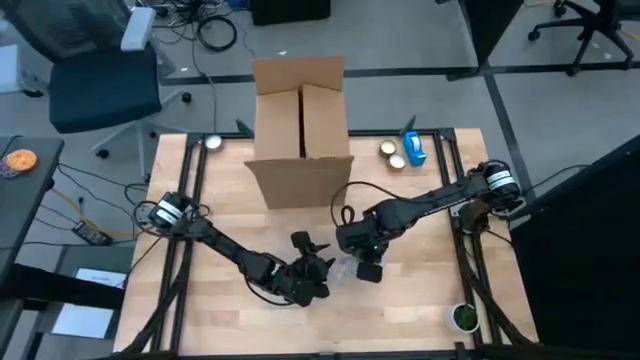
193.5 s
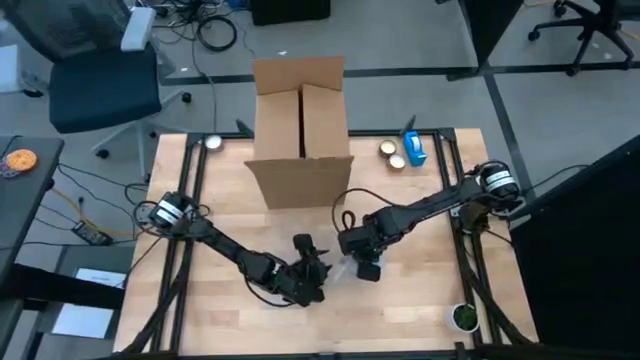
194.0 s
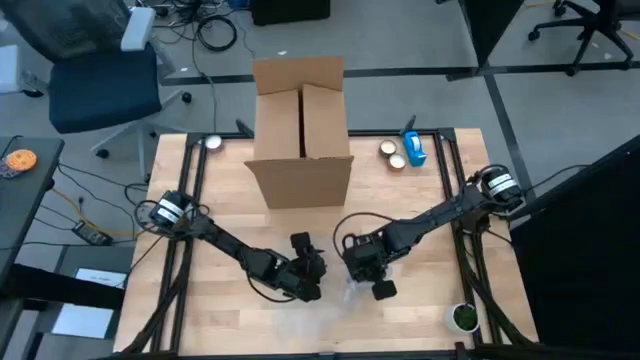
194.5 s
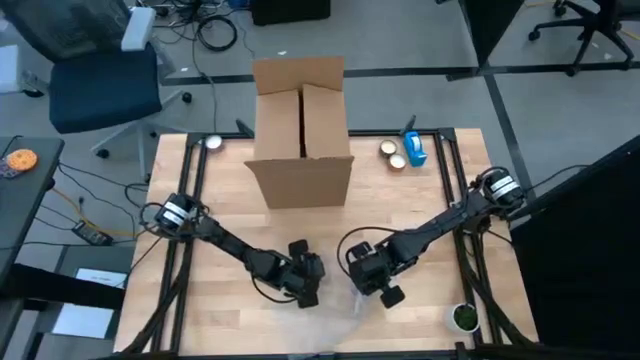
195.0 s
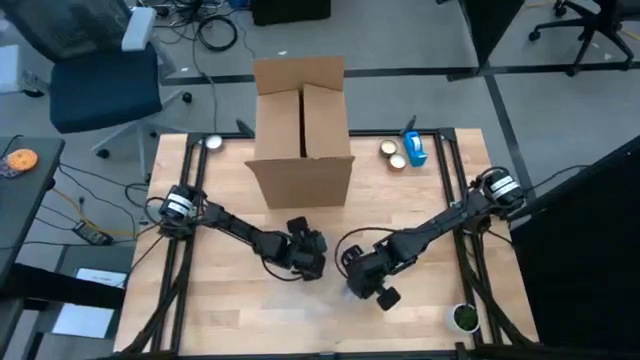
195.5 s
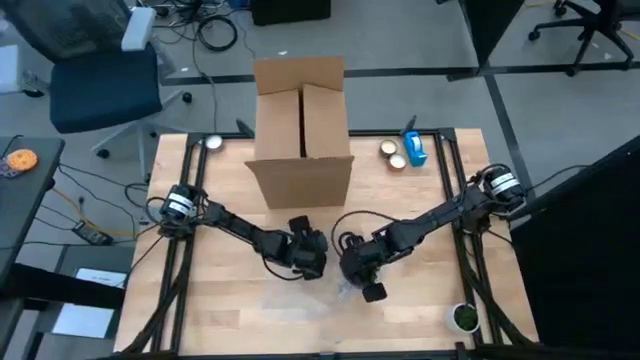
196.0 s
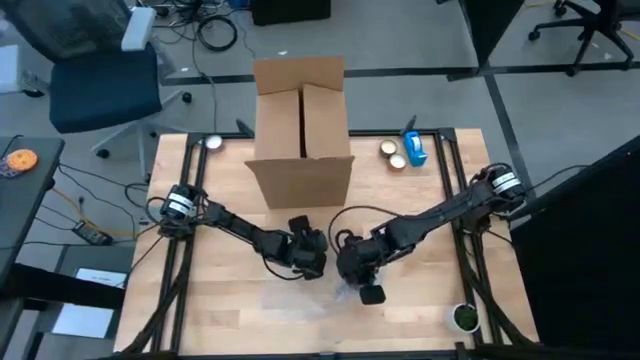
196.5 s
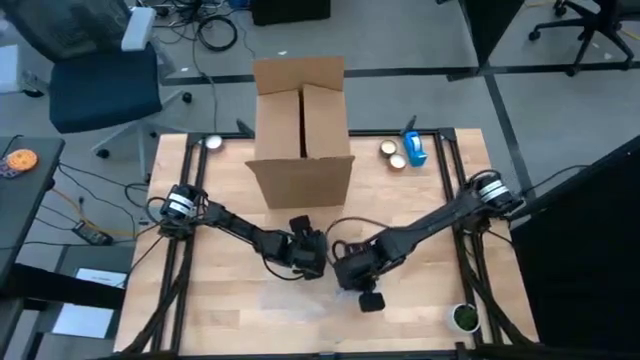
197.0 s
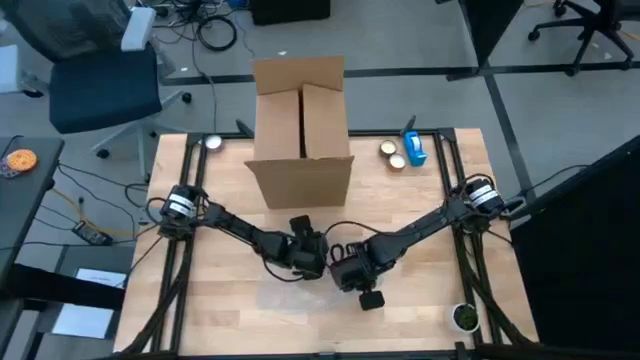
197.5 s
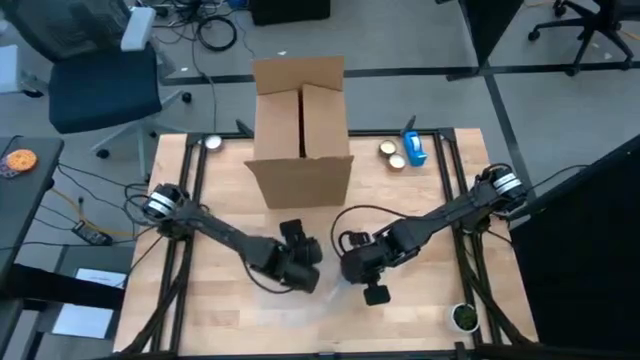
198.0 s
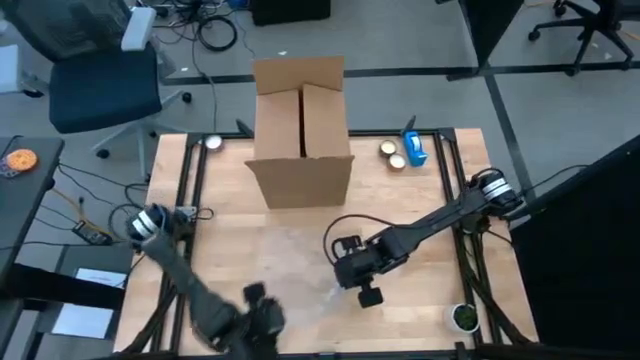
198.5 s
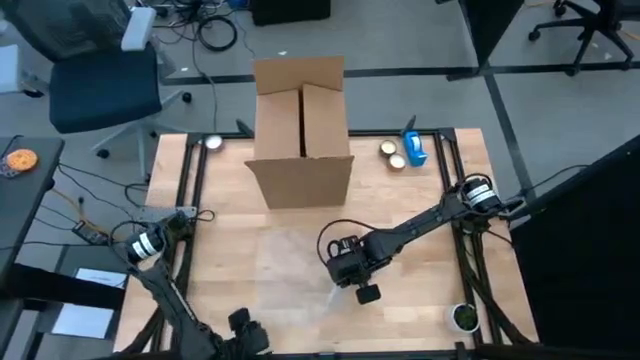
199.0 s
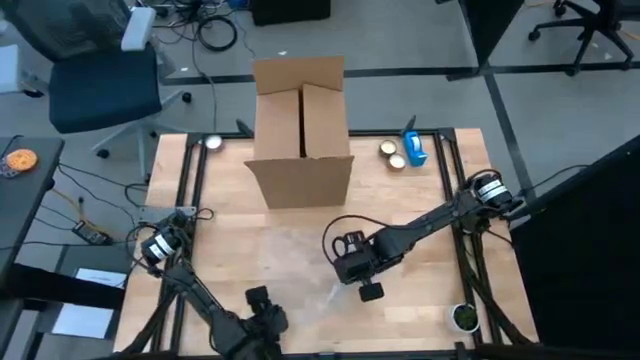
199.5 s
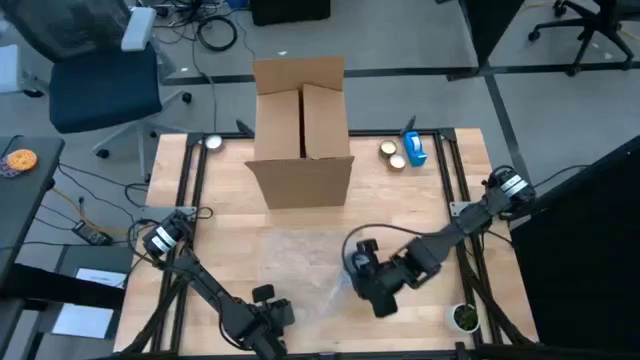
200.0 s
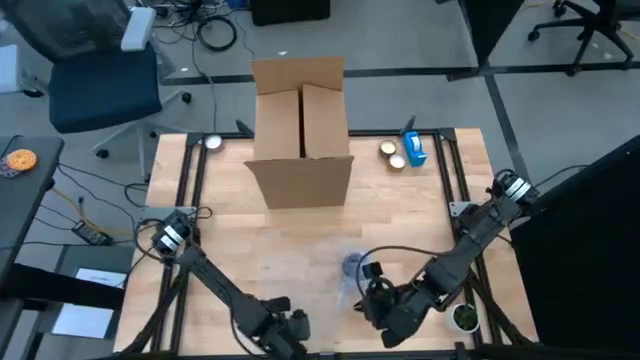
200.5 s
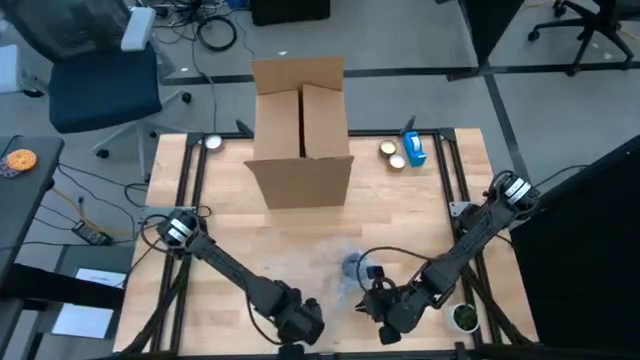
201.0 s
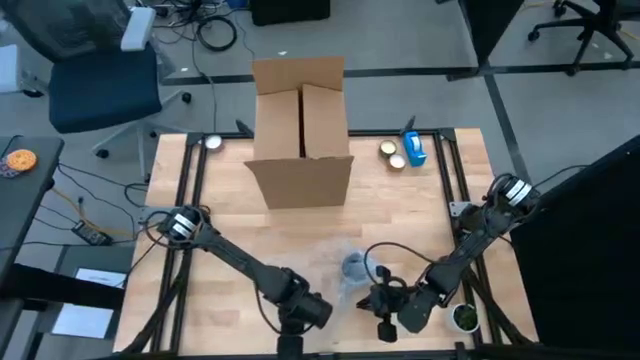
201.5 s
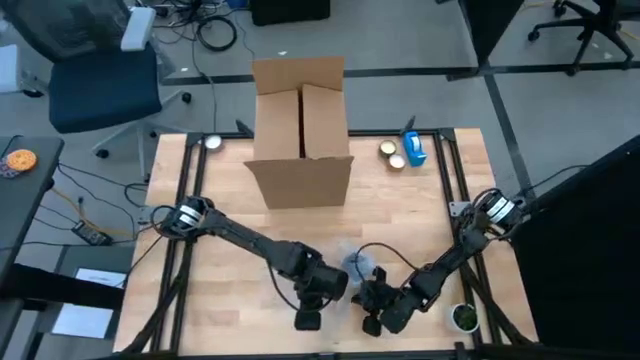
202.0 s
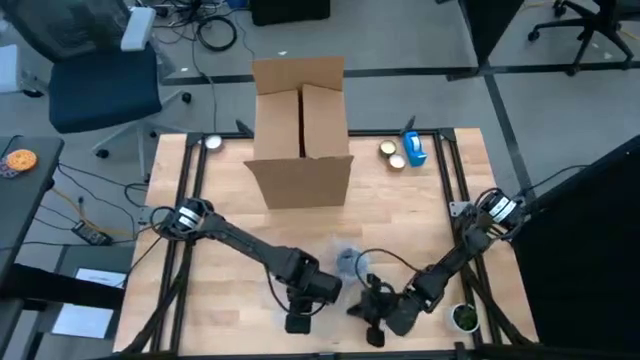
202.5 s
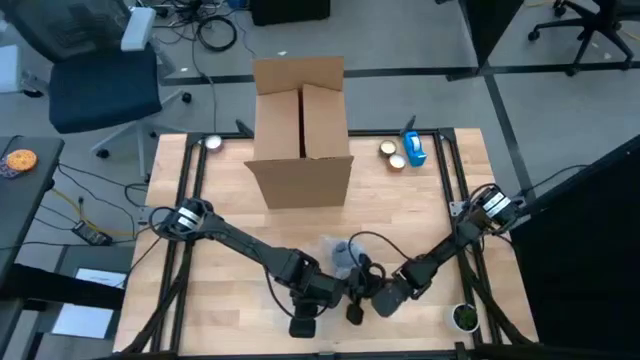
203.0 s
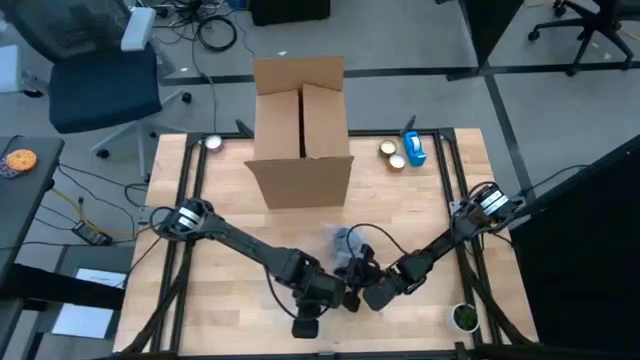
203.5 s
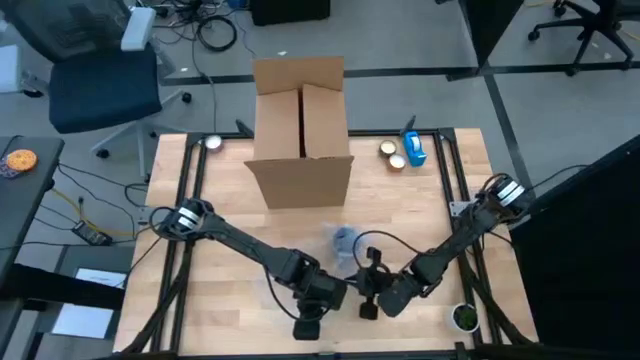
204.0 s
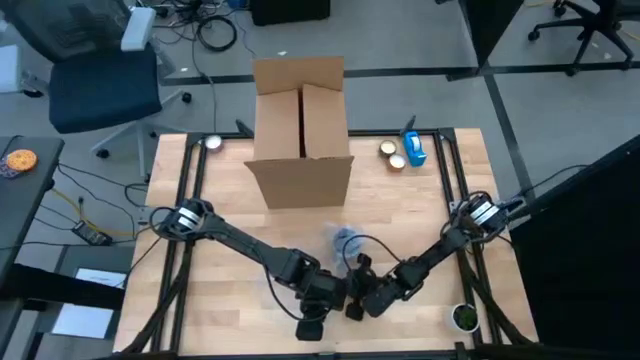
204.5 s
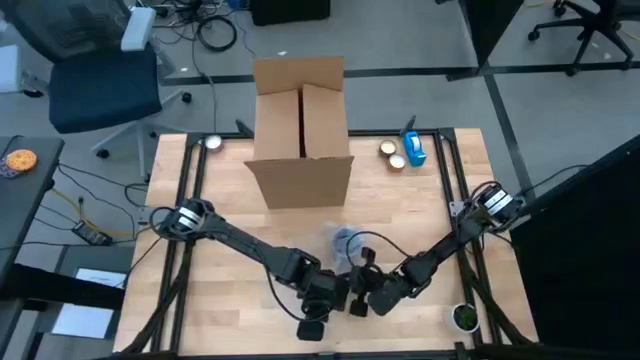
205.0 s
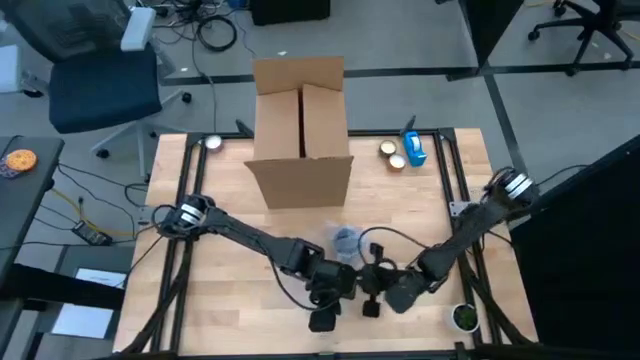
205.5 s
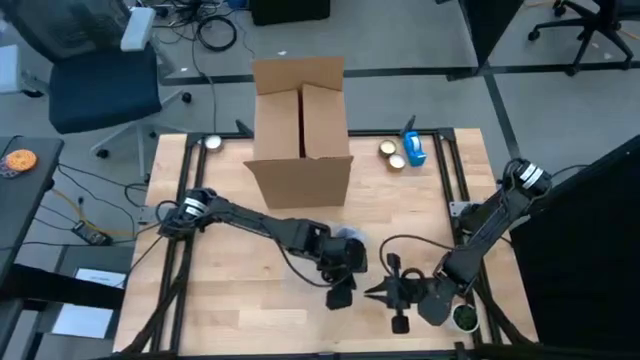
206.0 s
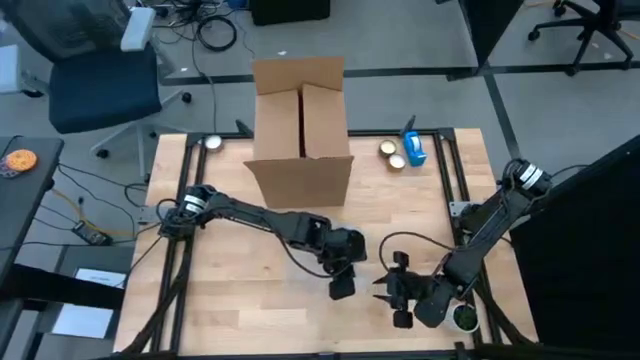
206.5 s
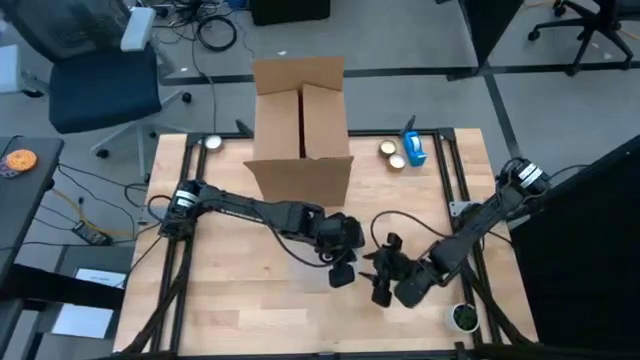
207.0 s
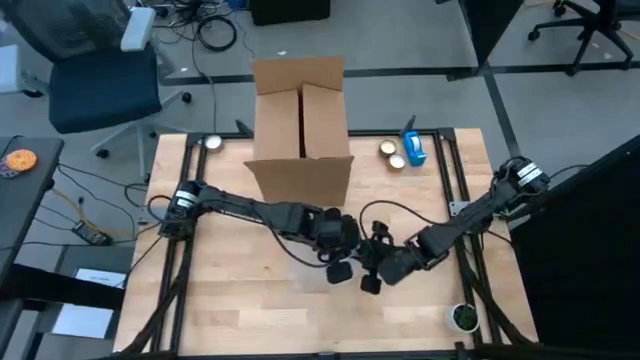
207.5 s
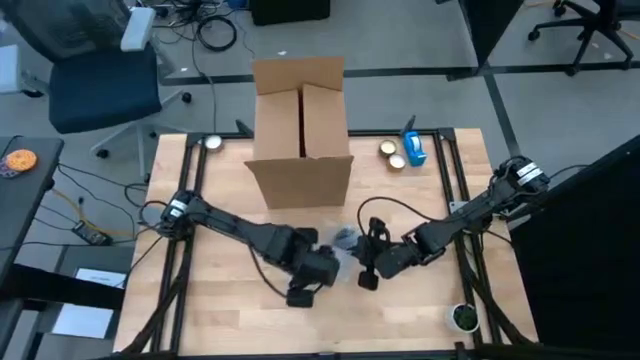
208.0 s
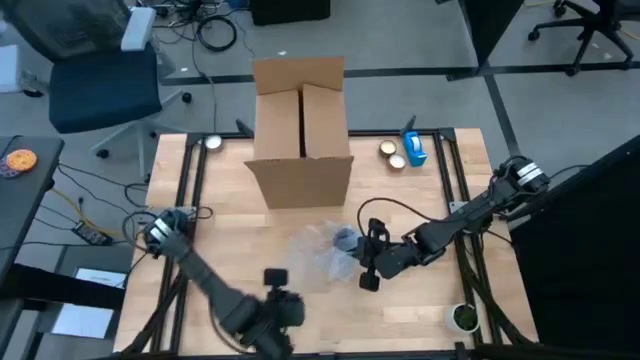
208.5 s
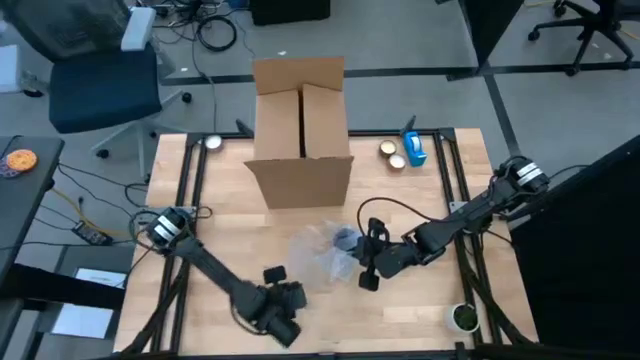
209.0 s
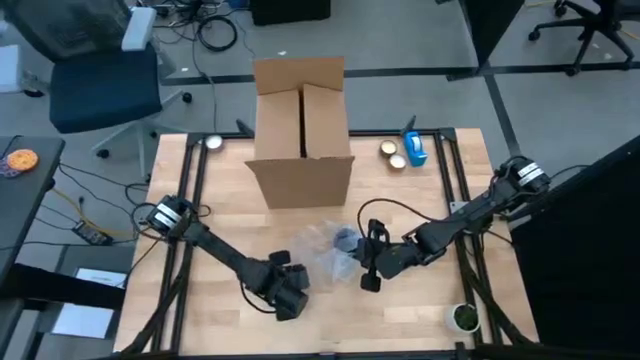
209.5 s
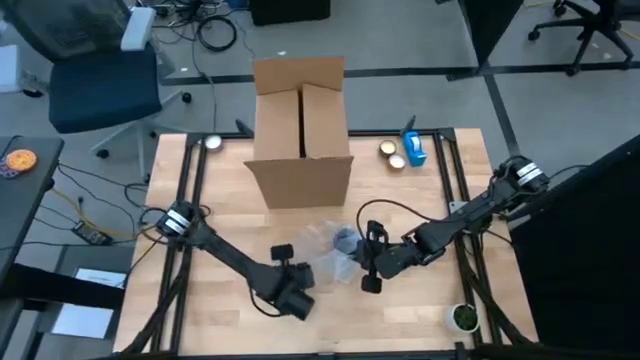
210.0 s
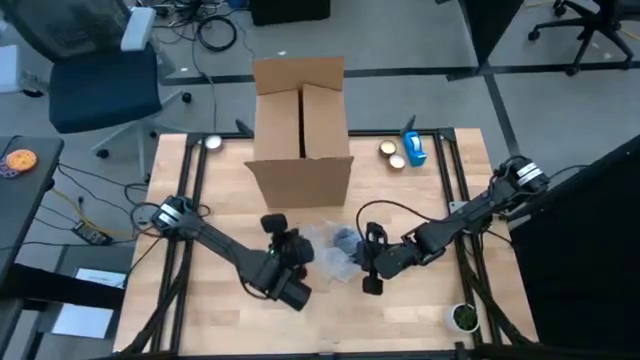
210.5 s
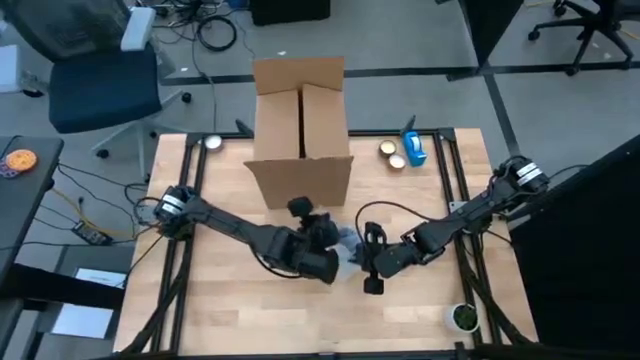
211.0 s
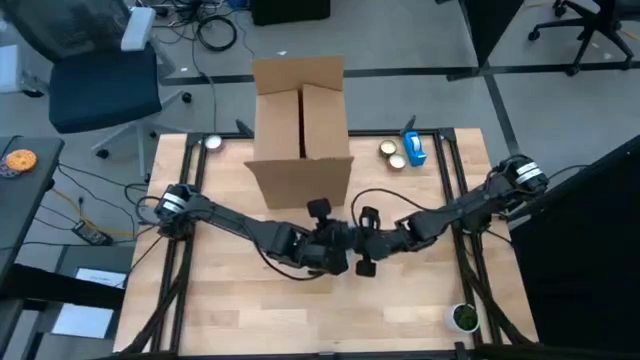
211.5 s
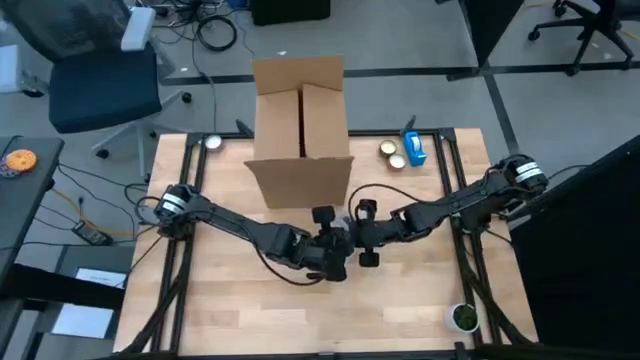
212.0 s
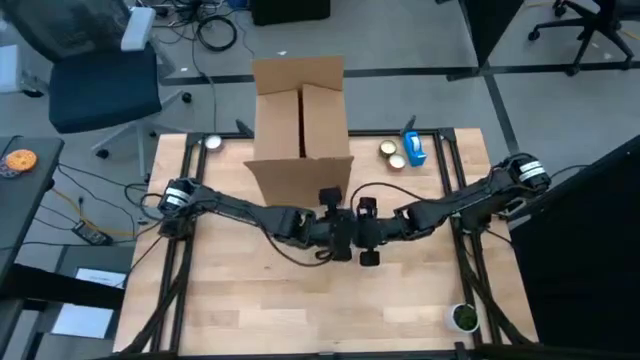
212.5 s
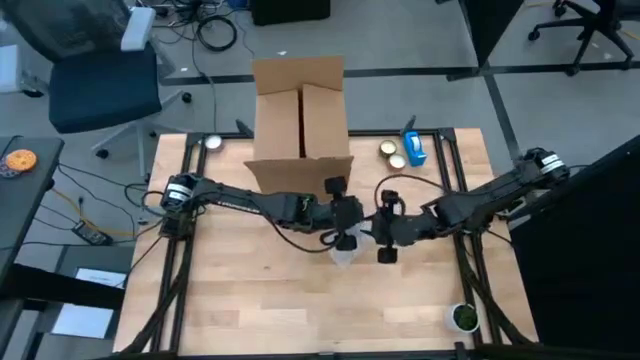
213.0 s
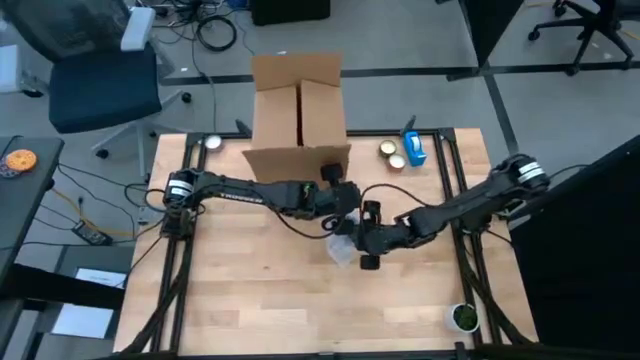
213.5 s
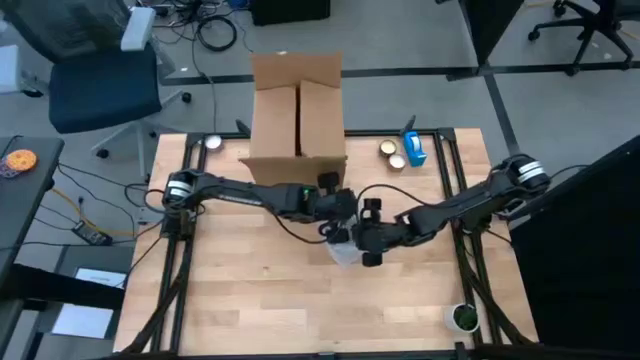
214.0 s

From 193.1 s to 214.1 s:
Task: wrap mug
Wrap the blue mug with bubble wrap

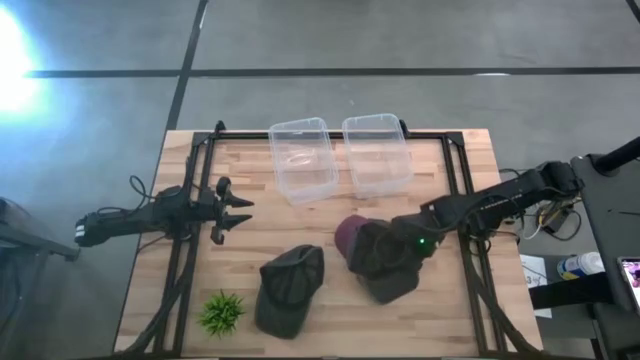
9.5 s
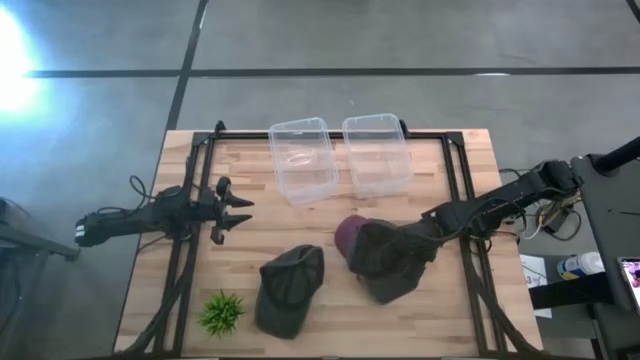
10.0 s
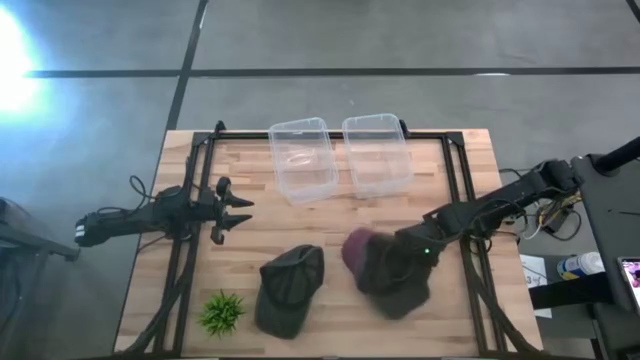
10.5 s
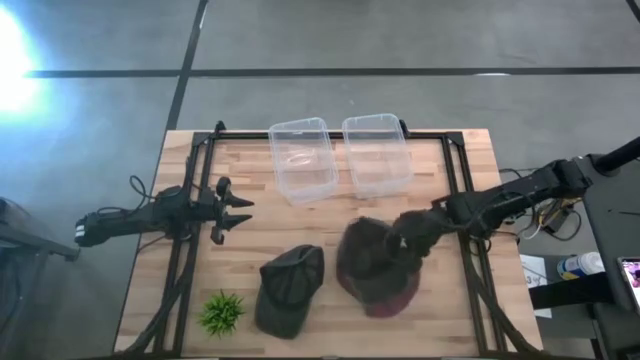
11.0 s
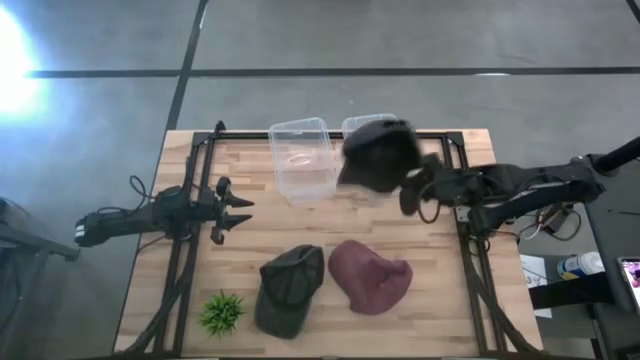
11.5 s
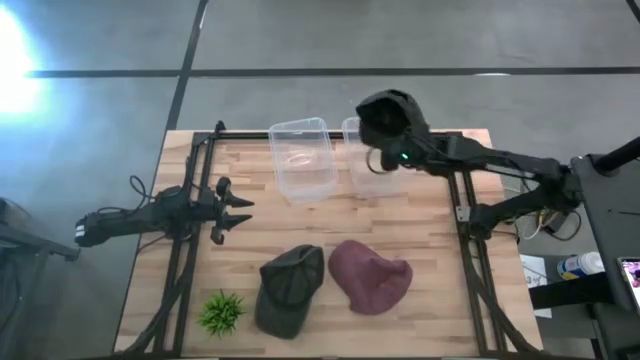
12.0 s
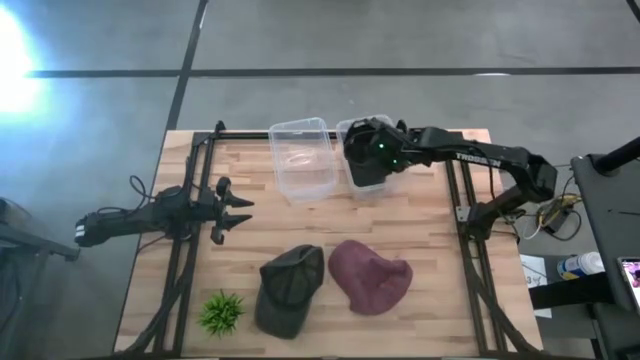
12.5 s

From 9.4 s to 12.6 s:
Task: Pick and place caps into container
Put the right black cap into the right transparent container
